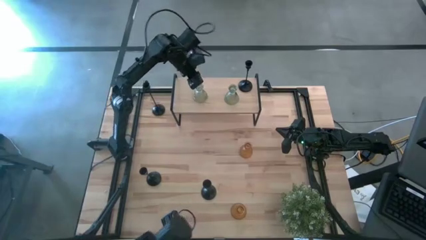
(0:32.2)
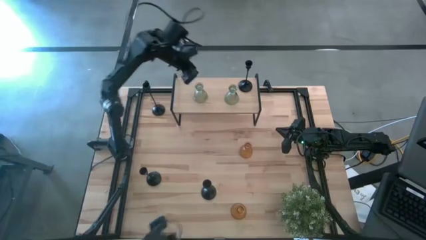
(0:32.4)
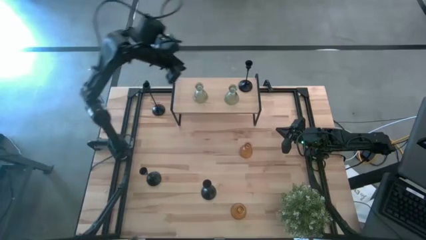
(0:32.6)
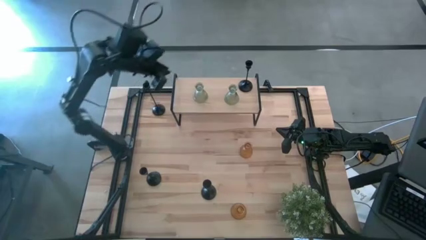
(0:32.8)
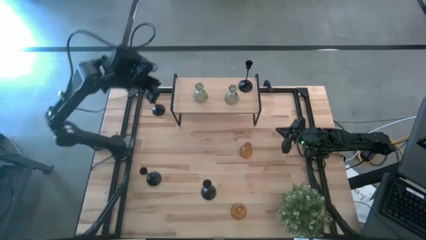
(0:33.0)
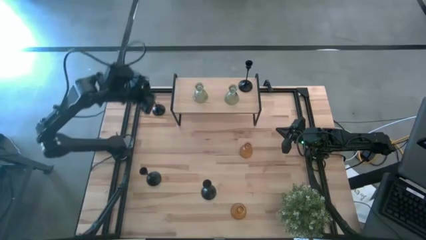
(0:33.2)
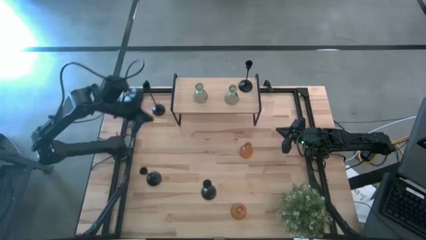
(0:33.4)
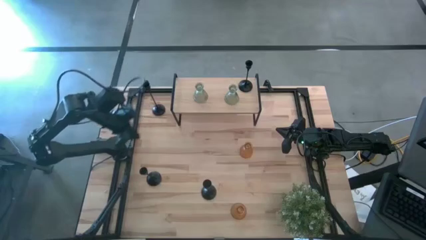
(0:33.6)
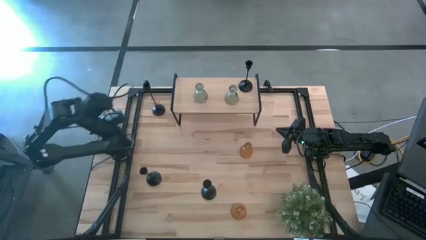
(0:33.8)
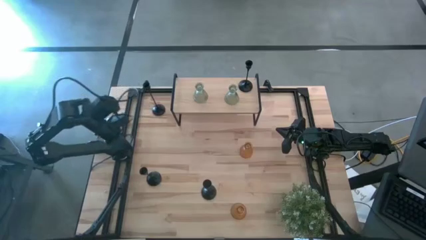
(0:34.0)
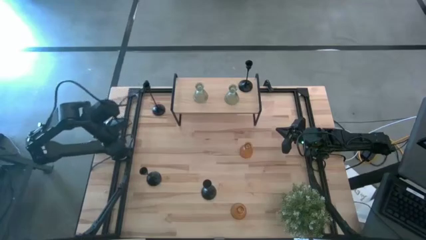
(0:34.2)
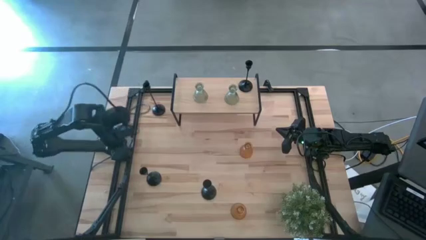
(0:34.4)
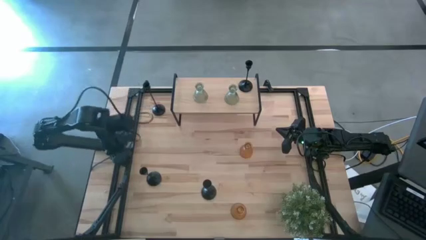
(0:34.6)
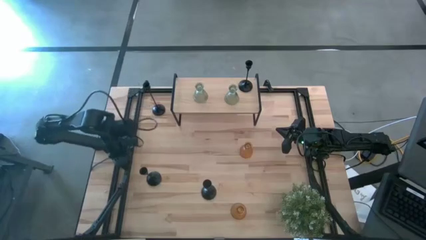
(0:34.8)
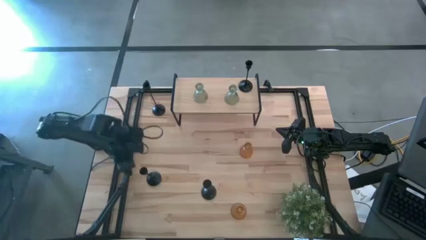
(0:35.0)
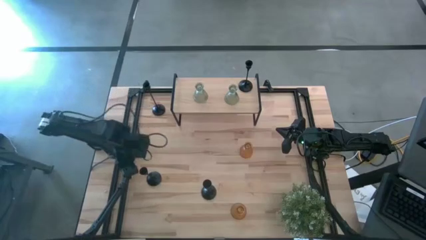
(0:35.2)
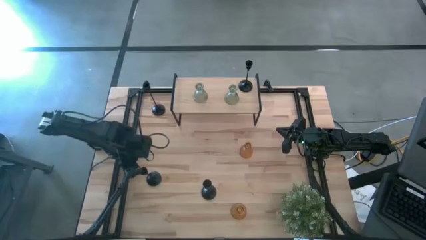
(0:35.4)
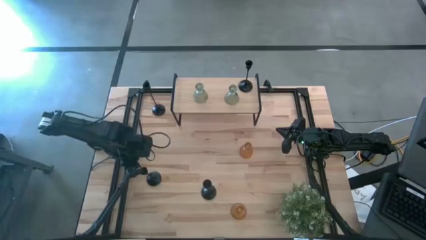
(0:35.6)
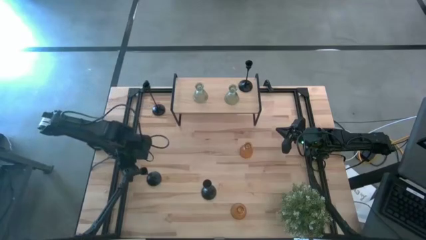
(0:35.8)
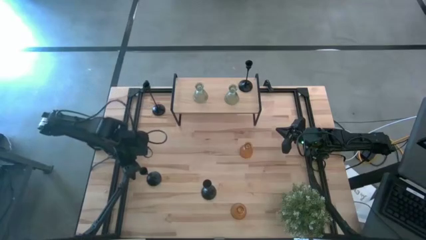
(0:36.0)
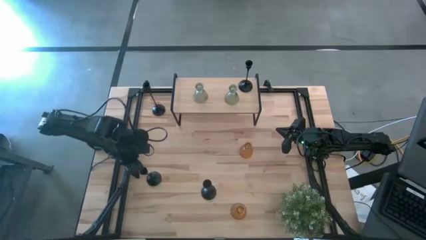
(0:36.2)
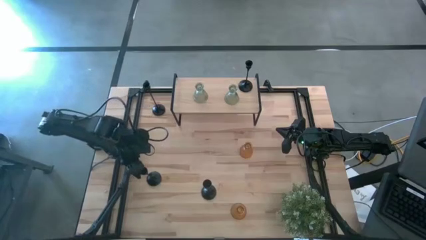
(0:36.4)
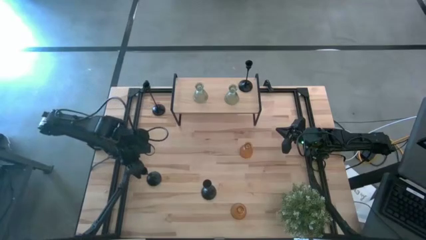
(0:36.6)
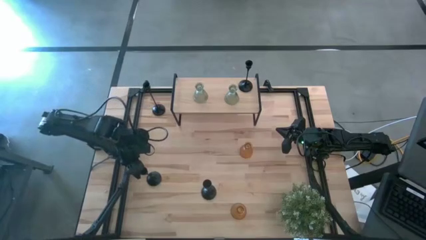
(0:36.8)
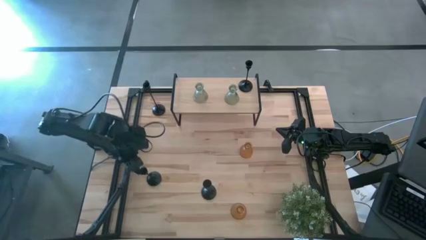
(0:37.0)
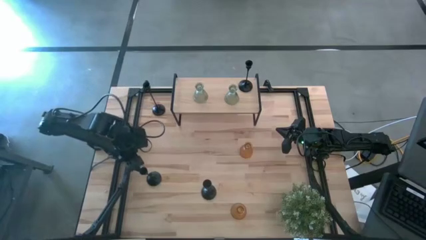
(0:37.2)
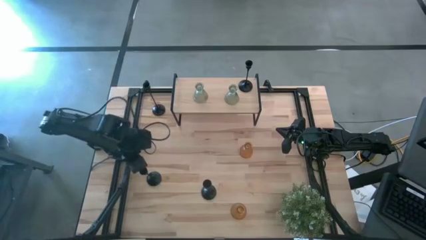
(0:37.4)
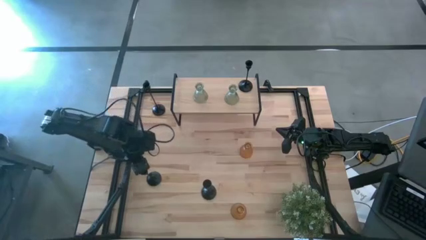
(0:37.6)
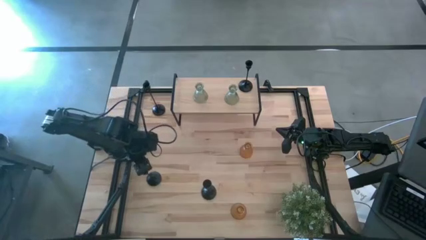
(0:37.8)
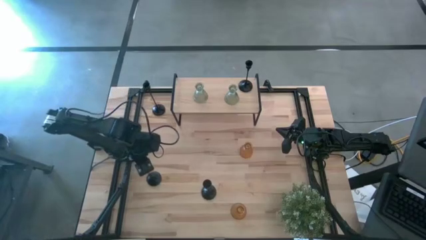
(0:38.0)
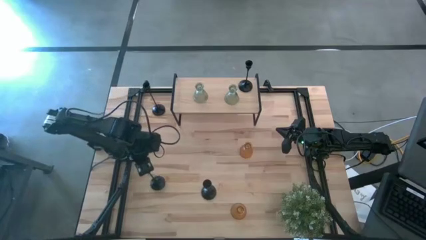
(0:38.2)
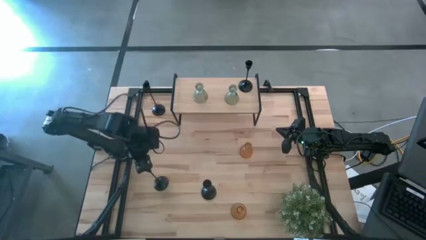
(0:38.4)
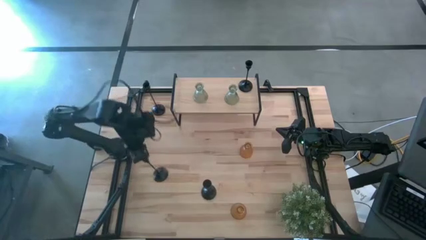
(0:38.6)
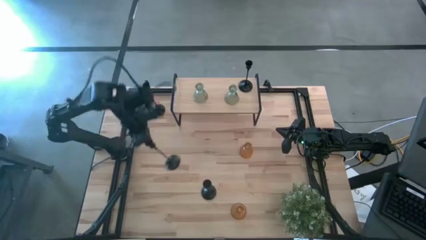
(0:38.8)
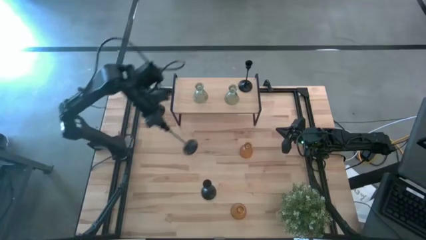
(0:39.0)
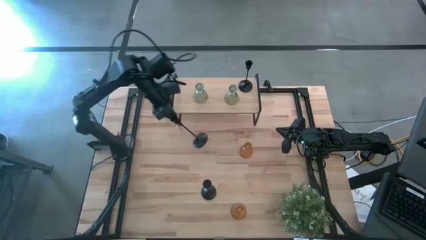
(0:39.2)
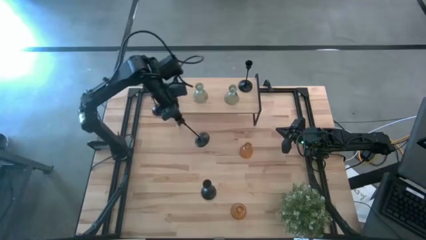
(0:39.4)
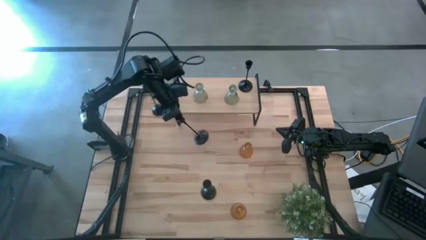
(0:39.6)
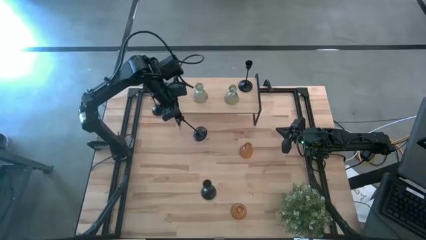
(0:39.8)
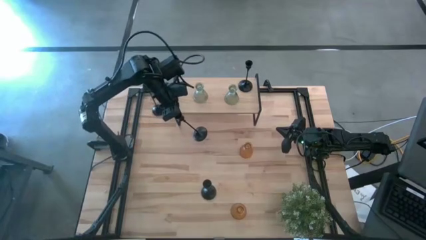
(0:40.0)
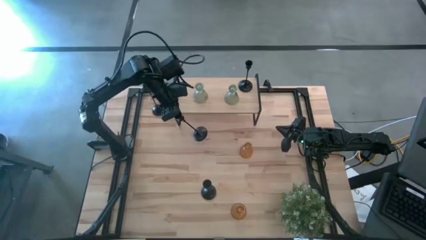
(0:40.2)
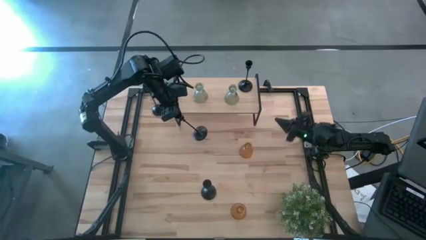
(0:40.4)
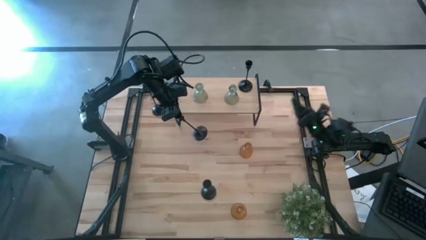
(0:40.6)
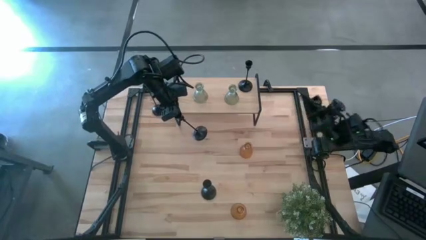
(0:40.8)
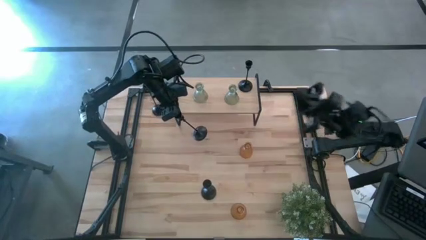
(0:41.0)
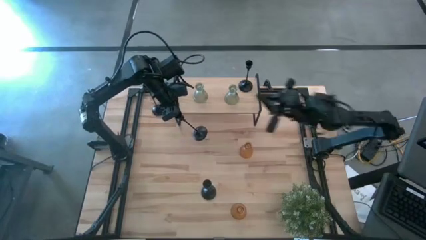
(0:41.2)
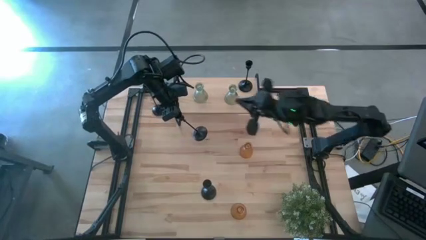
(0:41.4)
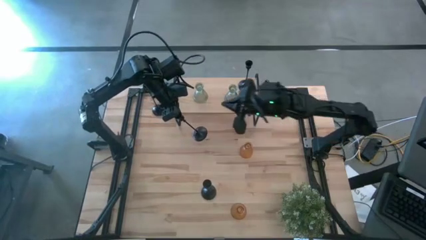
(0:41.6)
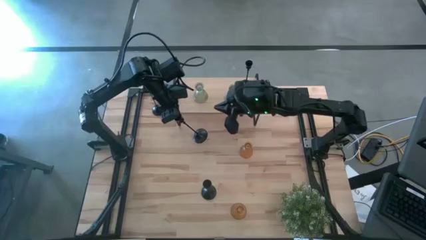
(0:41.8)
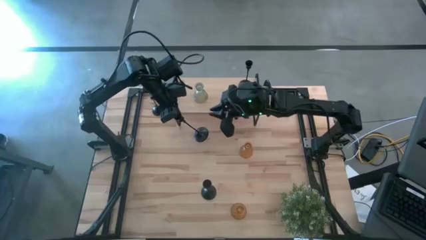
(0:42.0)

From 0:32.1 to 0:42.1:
Task: Pick & Place candle stick holders
Put the black candle holder on the shelf
